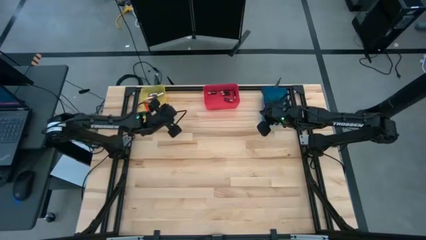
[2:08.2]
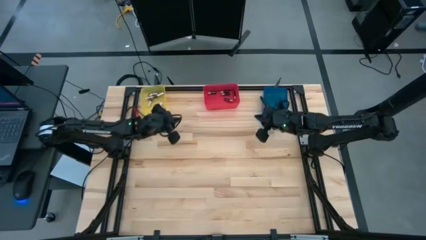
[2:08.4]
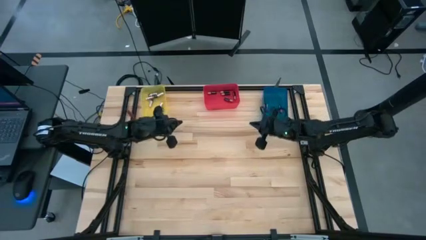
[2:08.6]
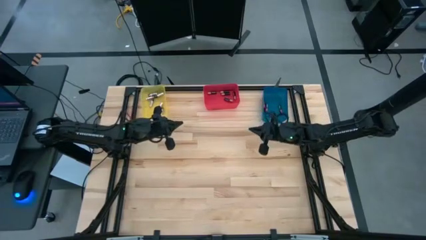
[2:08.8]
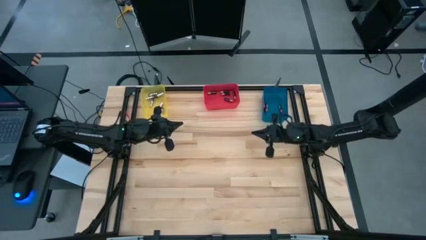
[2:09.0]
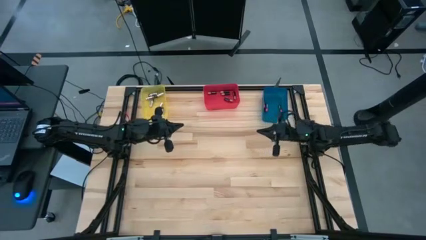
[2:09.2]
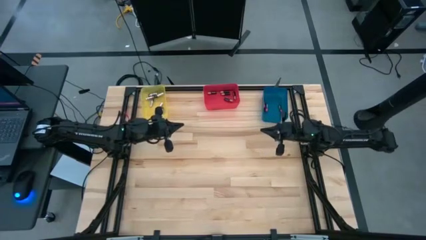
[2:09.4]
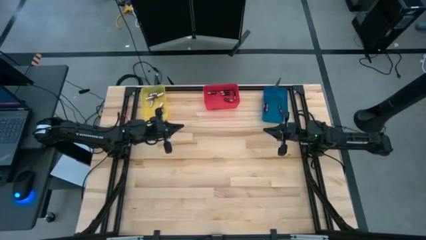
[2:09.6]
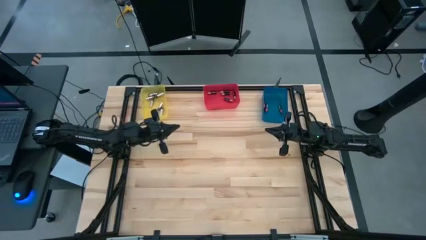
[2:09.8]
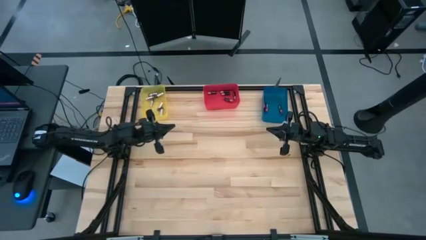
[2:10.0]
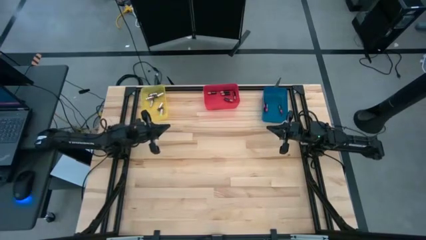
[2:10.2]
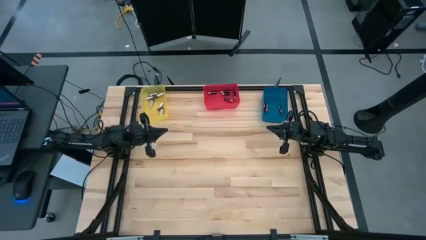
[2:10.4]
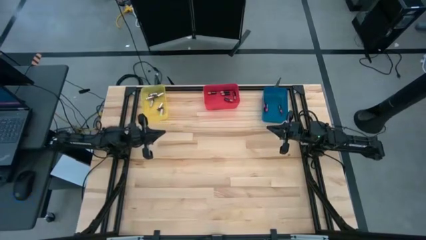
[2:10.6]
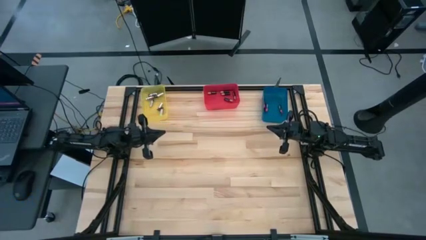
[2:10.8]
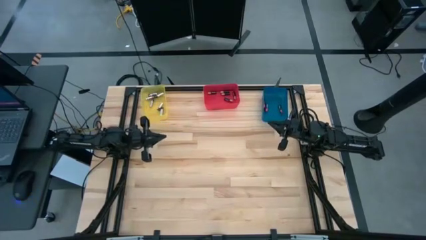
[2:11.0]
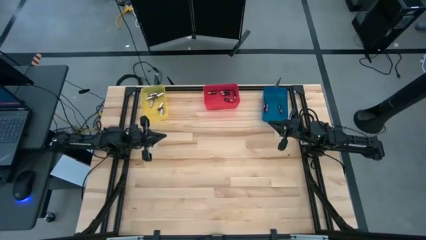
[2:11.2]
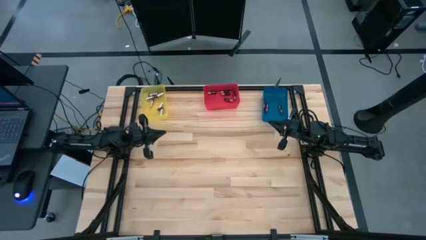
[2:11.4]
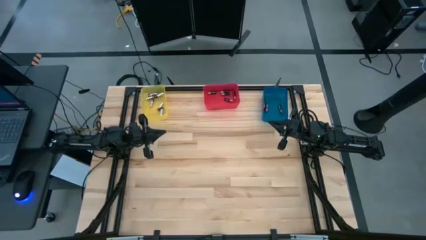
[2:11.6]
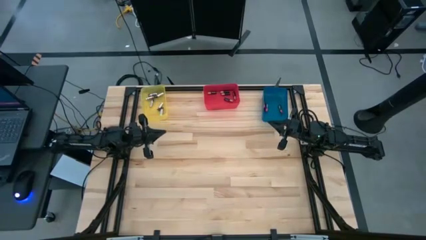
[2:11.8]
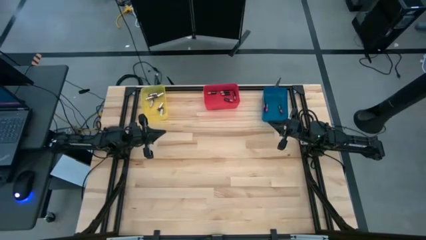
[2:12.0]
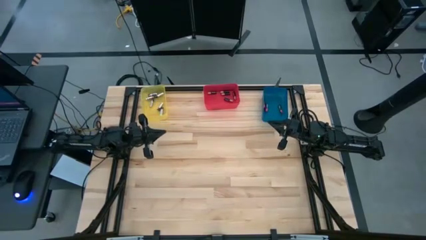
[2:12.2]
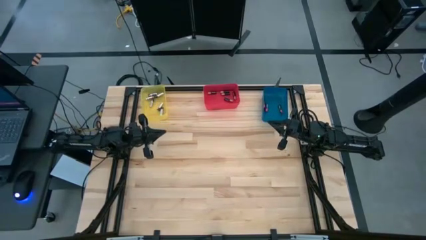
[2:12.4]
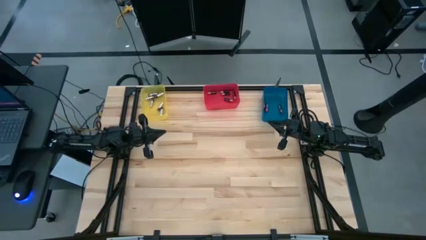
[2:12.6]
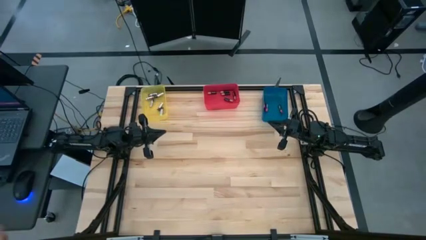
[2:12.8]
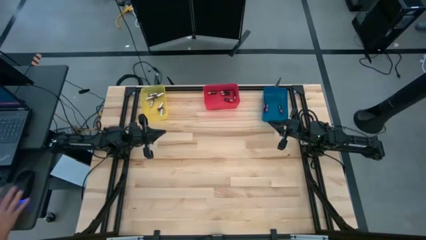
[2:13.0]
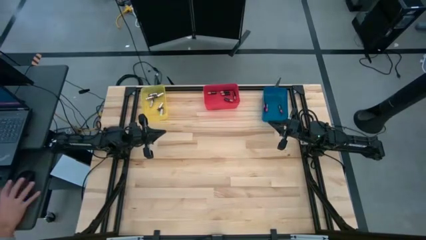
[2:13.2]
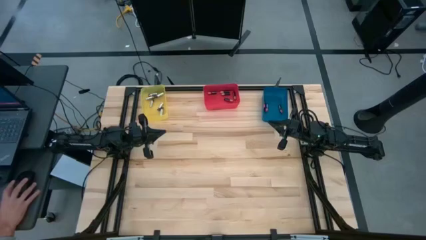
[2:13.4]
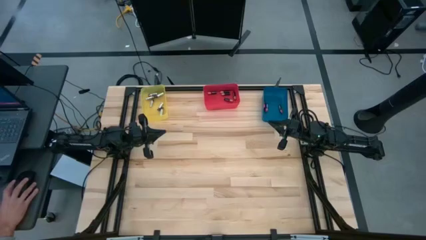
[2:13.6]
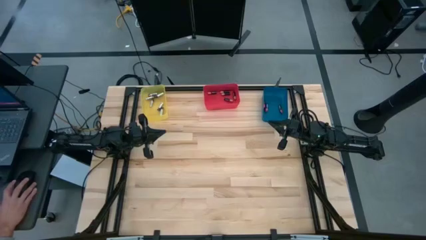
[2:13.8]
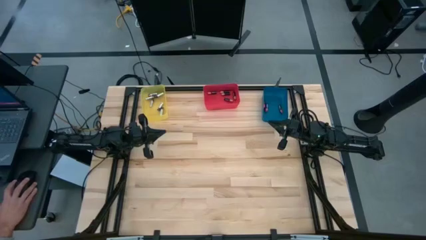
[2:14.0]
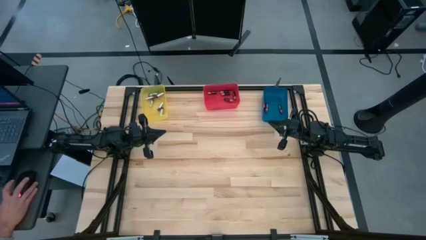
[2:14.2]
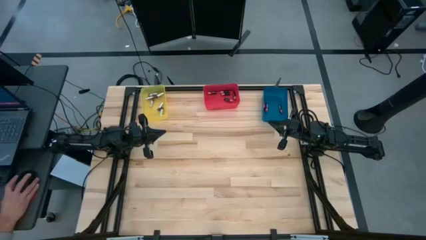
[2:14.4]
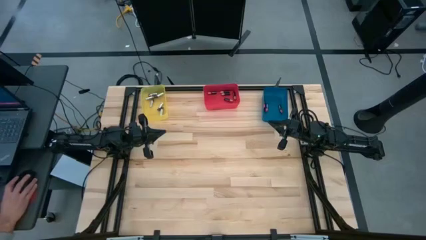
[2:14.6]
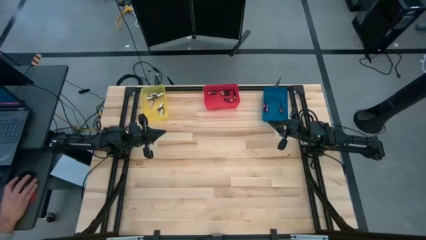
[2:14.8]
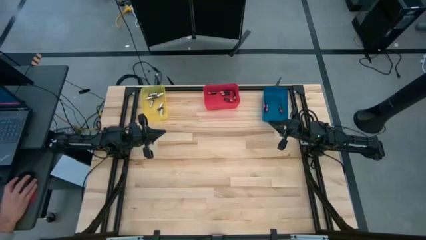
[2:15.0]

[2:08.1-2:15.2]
Task: Sort batteries
Return to Home Position

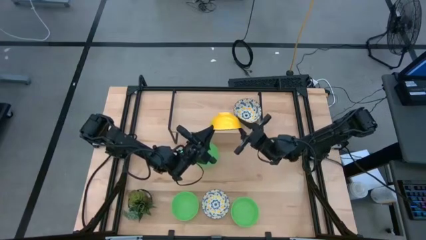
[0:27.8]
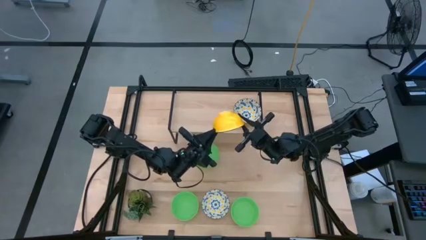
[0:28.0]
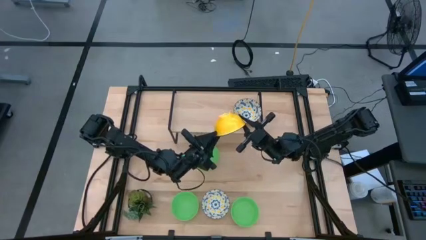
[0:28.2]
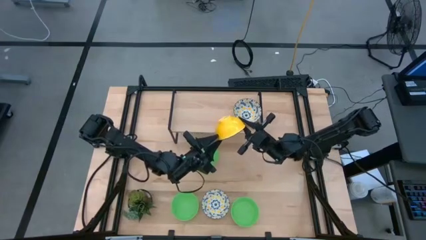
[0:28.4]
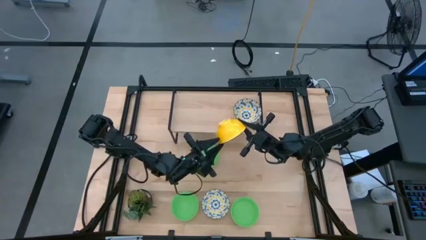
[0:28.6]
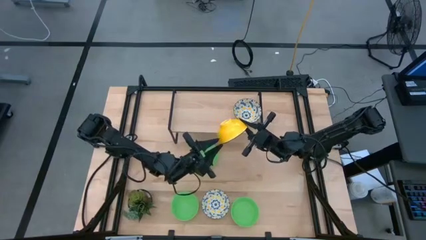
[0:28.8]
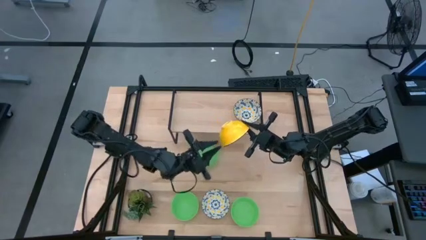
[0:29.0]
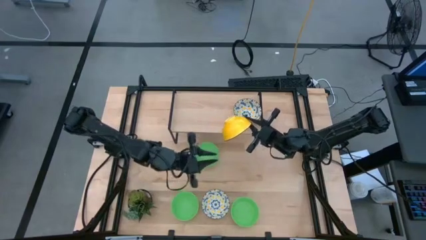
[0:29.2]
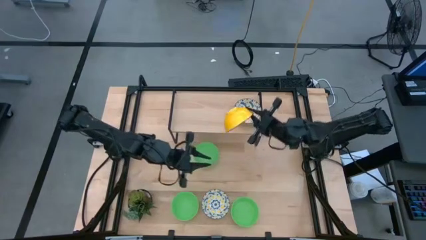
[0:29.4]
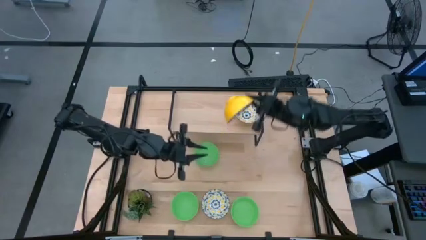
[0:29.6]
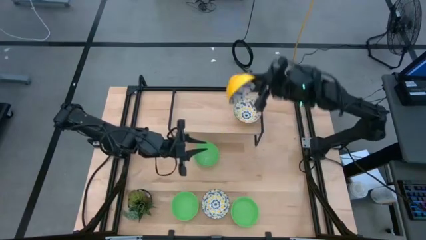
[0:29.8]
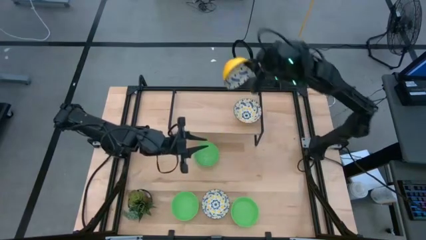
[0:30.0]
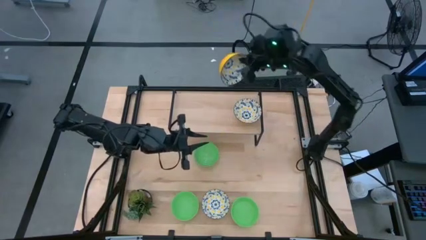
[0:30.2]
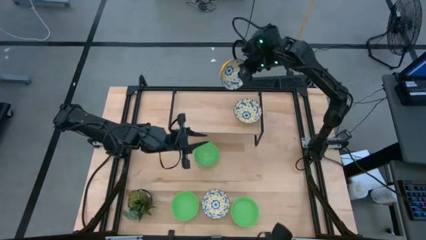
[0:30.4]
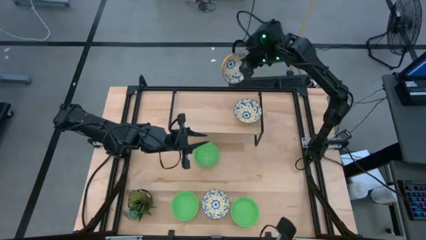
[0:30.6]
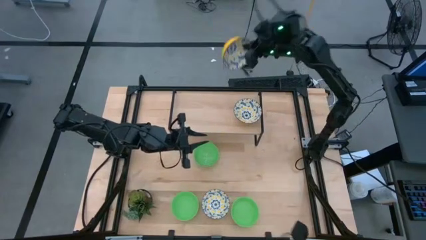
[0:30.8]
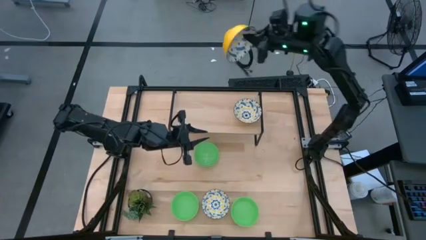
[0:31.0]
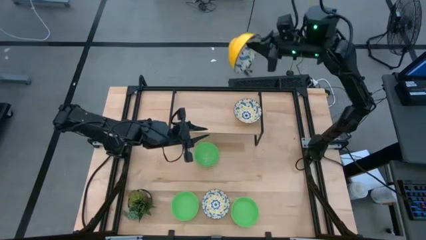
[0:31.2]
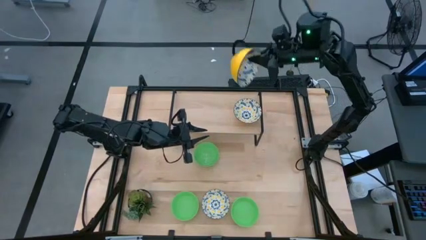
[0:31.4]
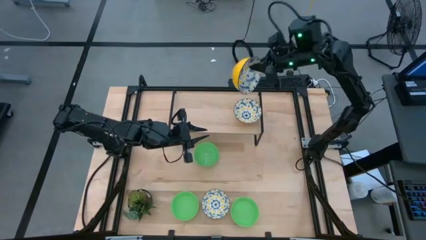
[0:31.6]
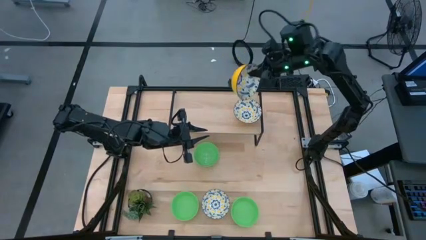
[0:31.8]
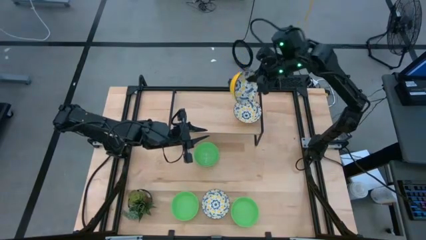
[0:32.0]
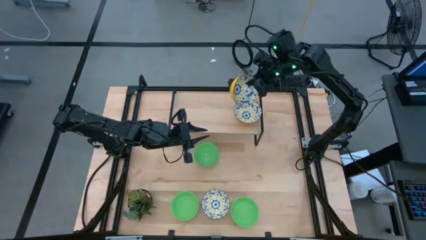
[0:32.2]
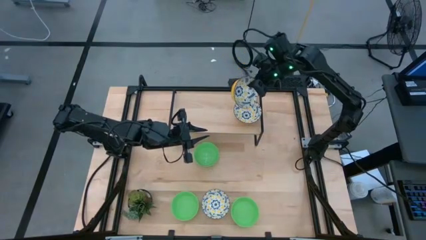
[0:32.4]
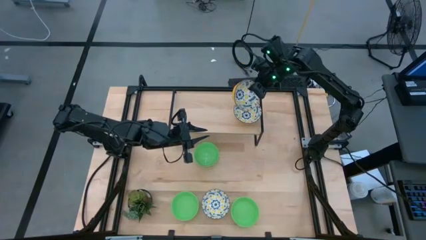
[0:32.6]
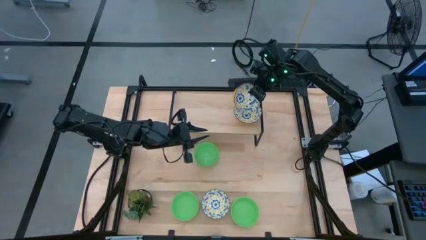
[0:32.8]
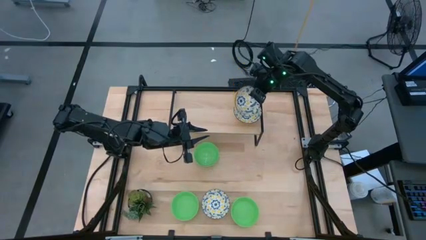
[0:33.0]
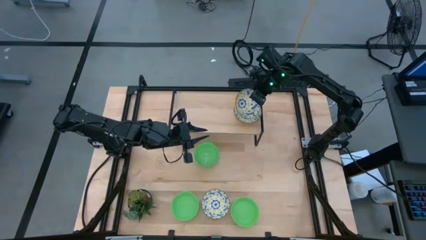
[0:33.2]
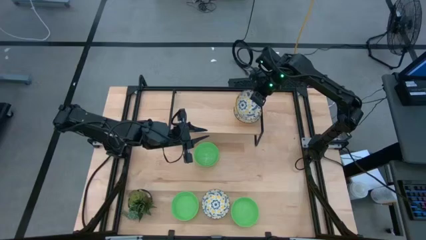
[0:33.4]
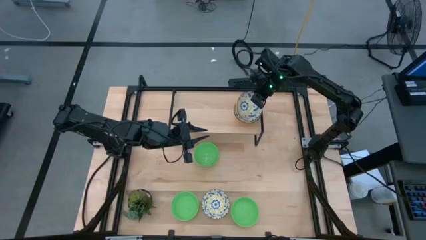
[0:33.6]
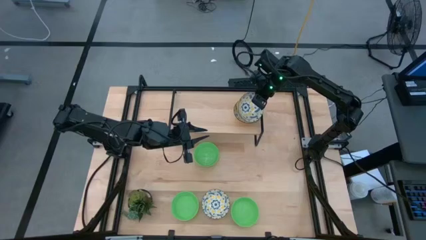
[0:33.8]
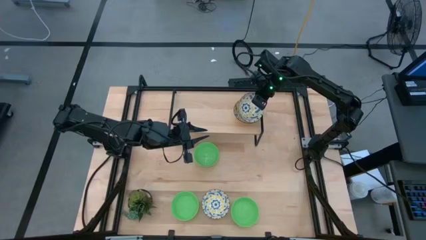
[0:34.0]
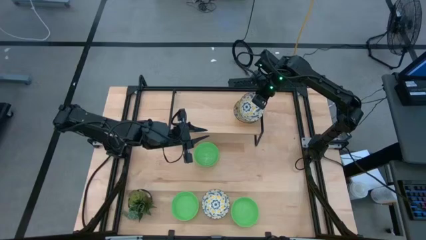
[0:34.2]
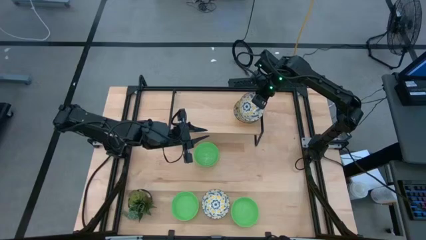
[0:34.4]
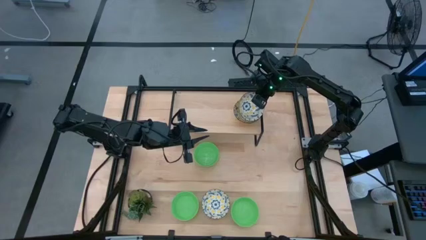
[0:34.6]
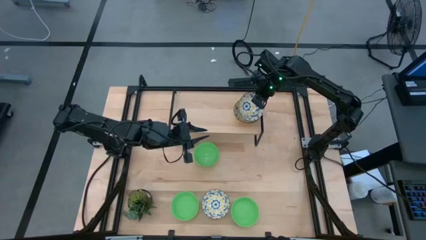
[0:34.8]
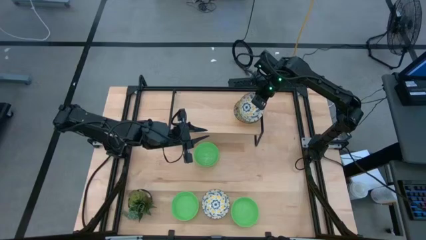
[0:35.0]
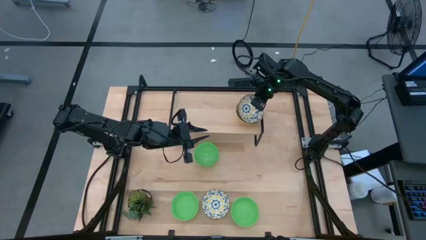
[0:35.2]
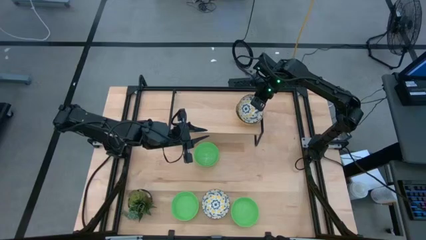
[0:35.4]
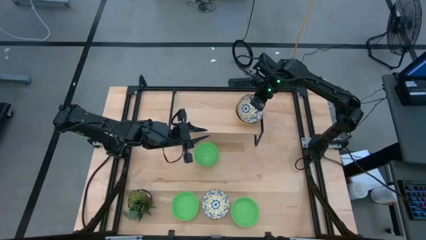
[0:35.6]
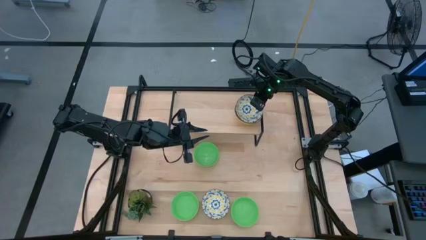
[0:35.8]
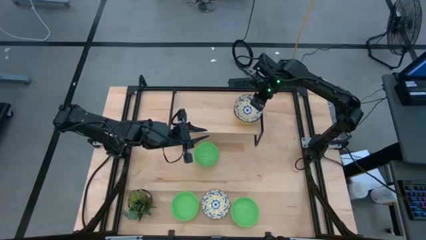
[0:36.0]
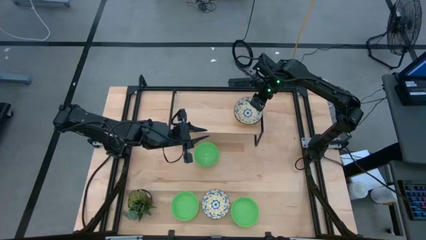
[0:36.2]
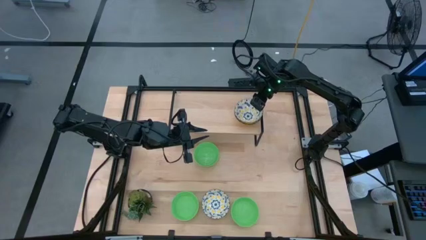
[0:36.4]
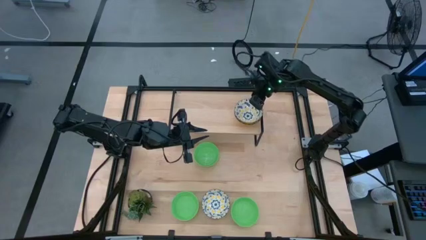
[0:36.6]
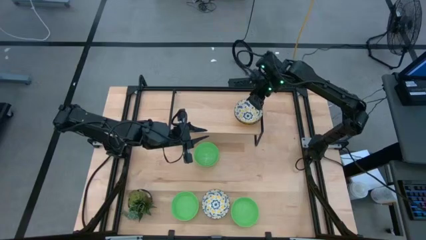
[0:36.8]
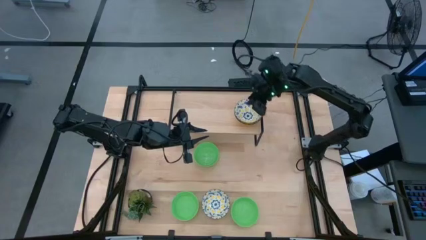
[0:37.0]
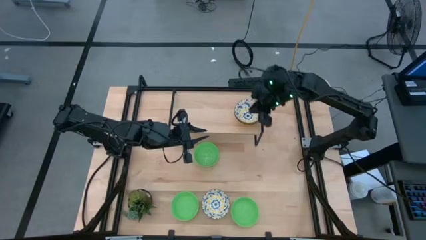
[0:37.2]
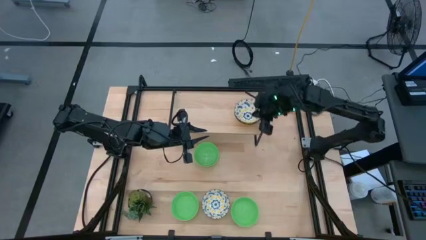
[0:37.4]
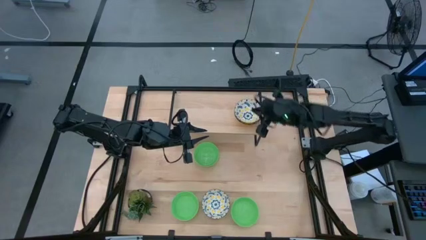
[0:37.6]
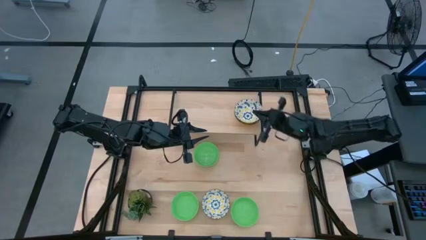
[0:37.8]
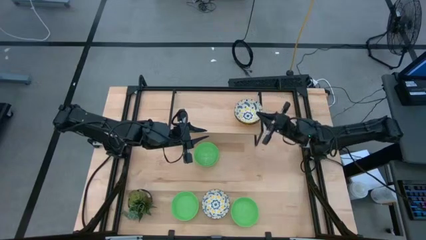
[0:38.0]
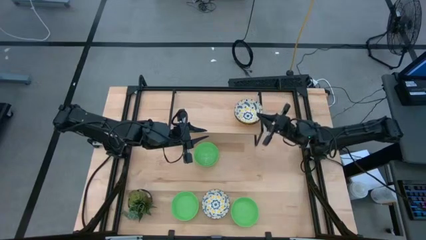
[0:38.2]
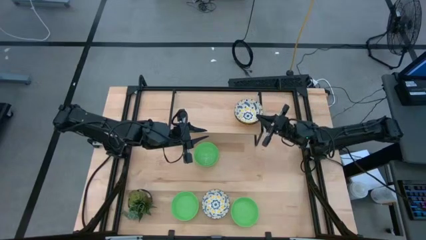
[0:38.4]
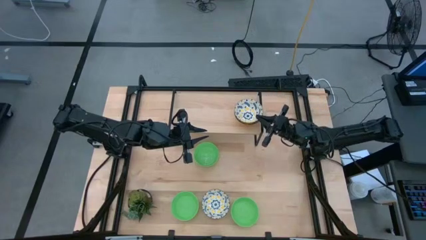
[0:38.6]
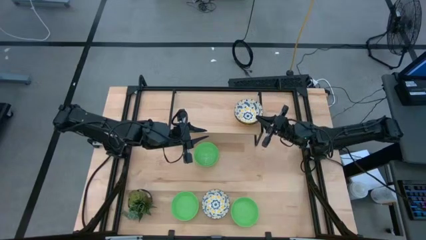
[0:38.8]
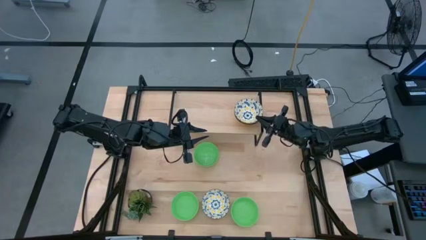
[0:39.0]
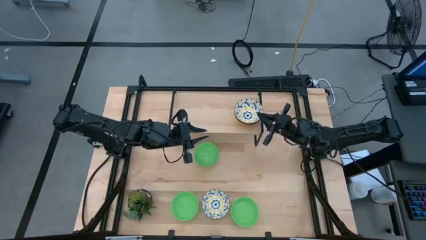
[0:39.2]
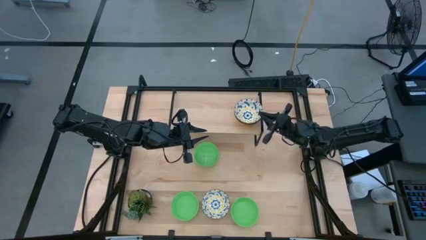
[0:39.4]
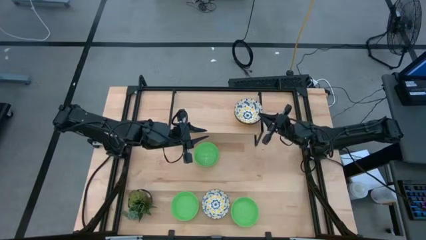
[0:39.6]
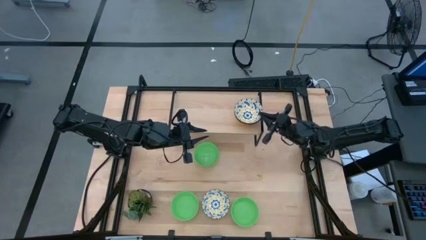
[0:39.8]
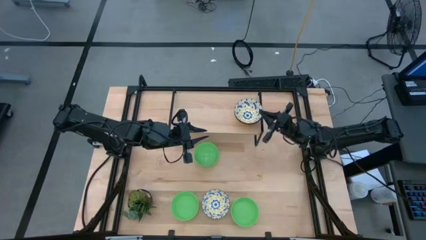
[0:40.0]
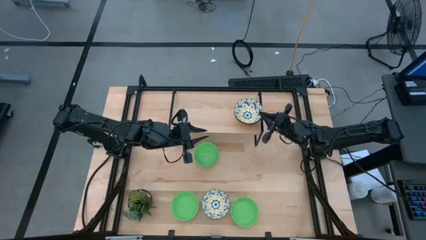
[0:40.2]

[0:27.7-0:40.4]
Task: Pick & Place Mini bowls
Stack the top white bowl on top of the white bowl on the shelf
